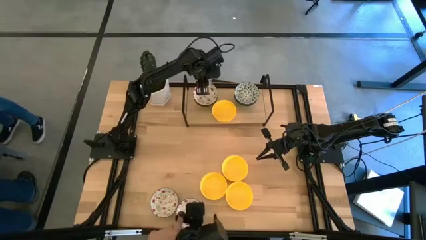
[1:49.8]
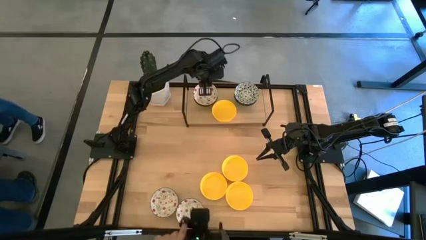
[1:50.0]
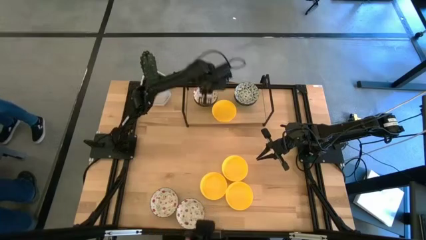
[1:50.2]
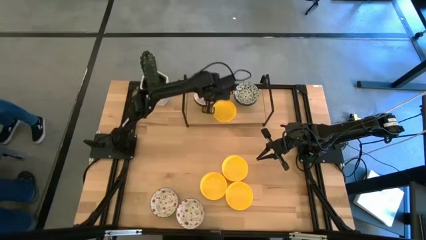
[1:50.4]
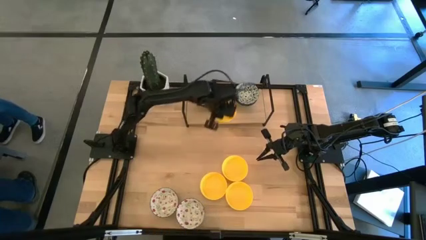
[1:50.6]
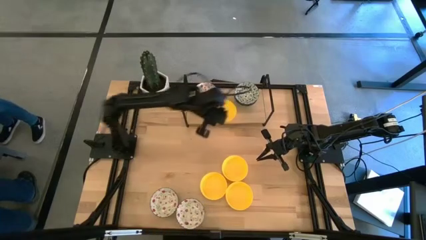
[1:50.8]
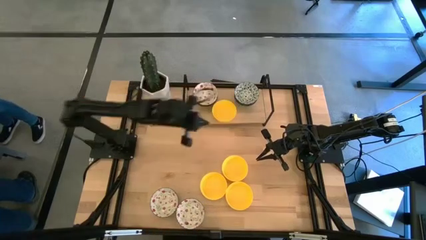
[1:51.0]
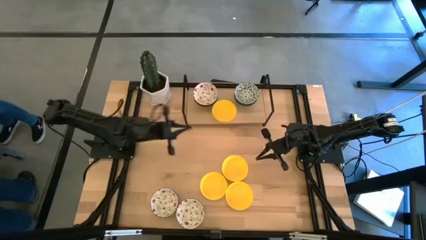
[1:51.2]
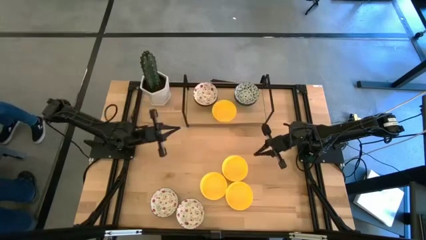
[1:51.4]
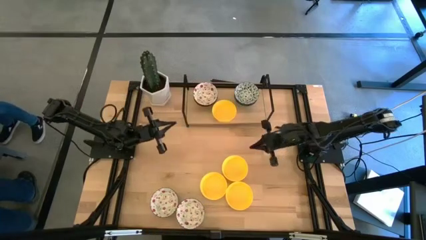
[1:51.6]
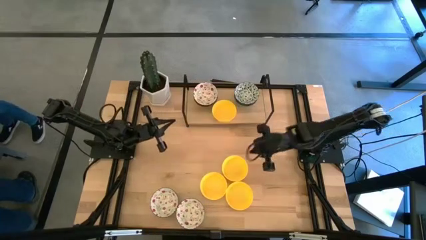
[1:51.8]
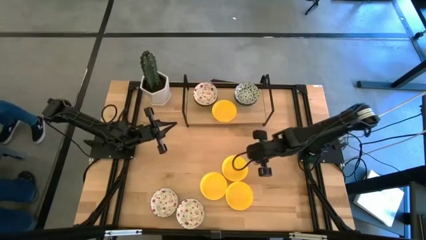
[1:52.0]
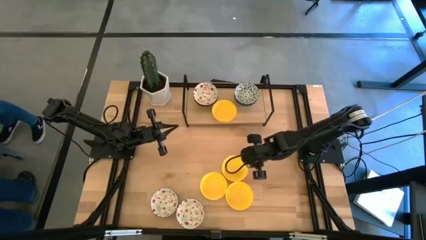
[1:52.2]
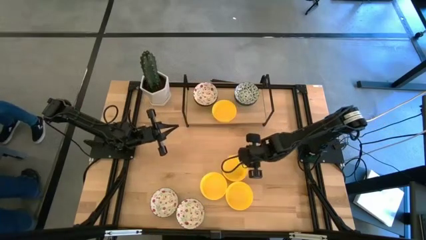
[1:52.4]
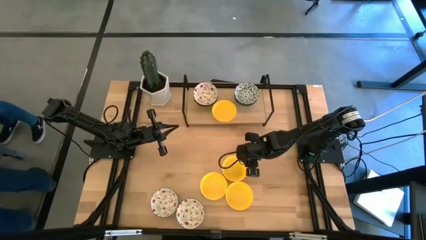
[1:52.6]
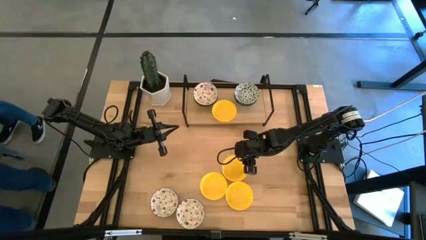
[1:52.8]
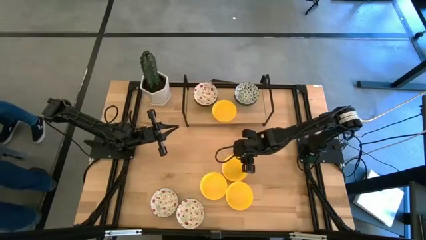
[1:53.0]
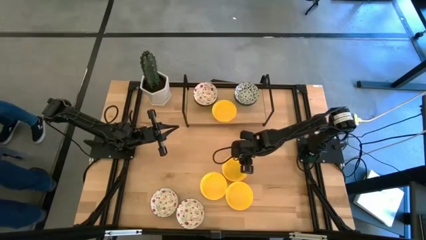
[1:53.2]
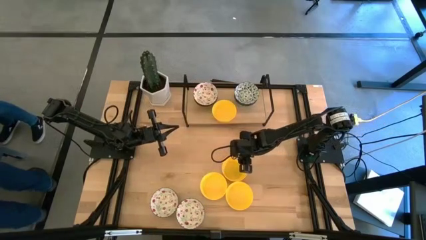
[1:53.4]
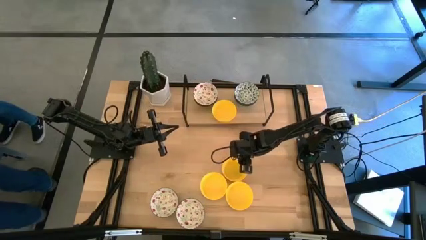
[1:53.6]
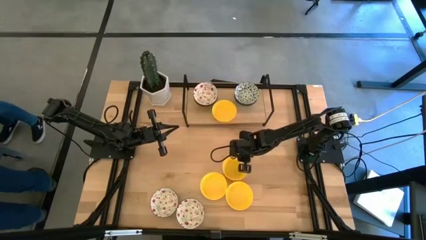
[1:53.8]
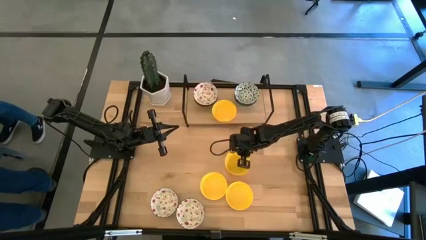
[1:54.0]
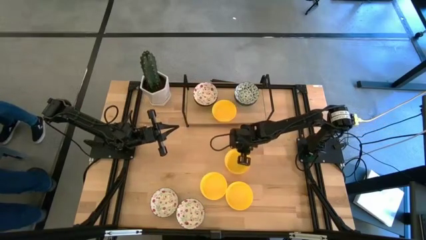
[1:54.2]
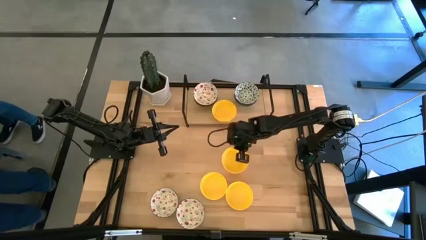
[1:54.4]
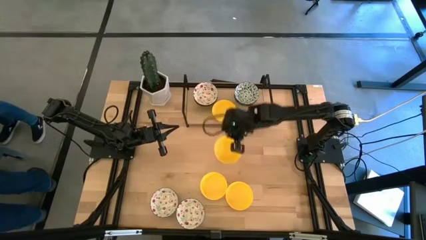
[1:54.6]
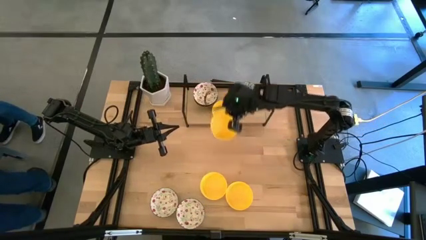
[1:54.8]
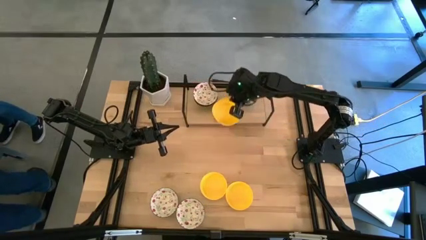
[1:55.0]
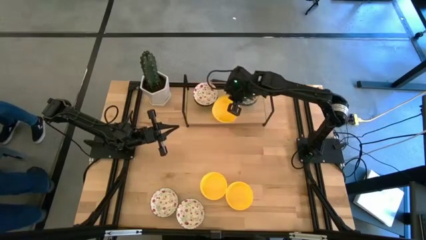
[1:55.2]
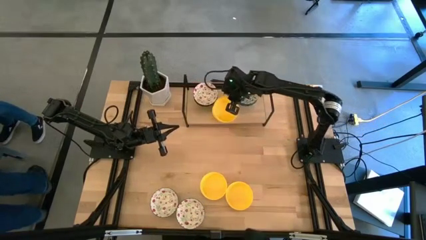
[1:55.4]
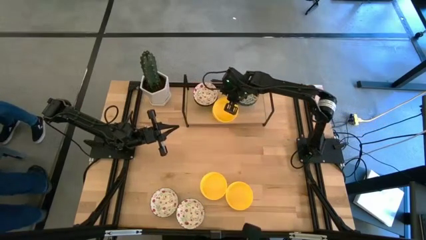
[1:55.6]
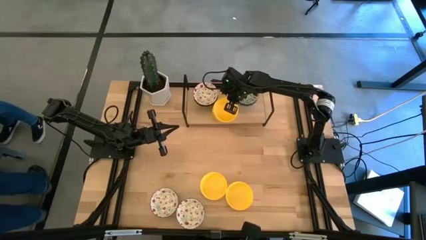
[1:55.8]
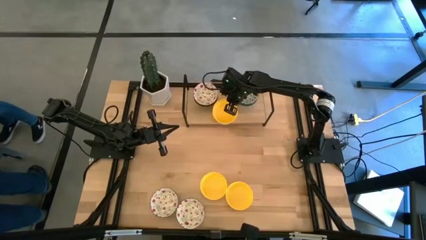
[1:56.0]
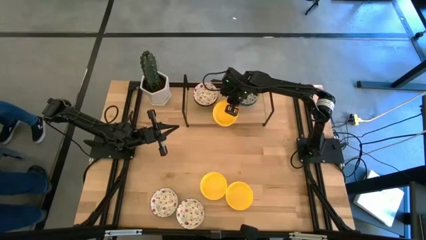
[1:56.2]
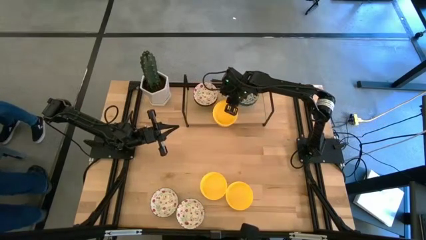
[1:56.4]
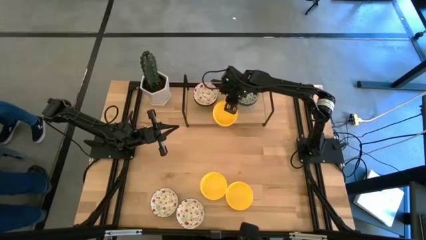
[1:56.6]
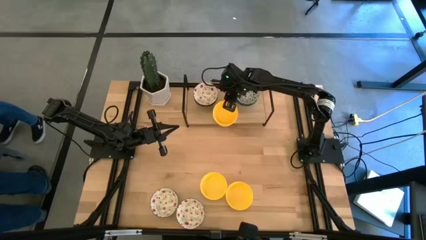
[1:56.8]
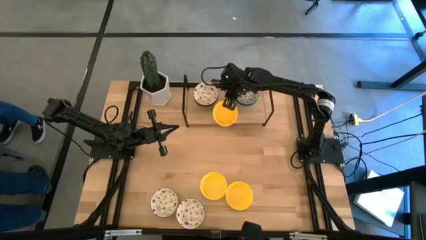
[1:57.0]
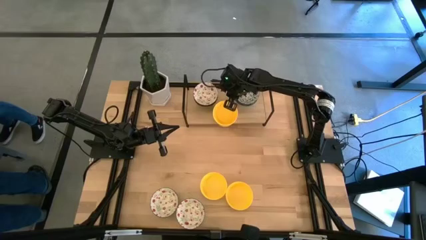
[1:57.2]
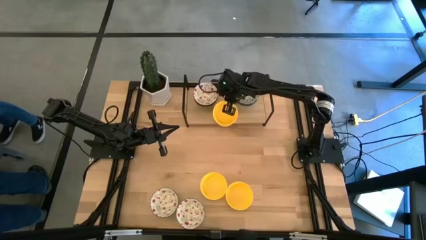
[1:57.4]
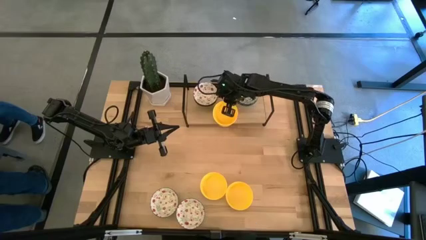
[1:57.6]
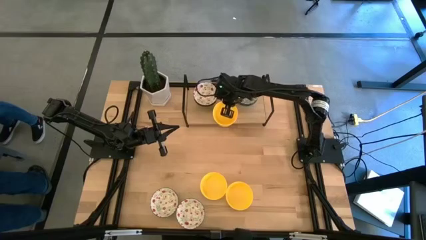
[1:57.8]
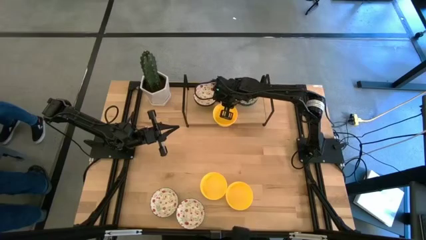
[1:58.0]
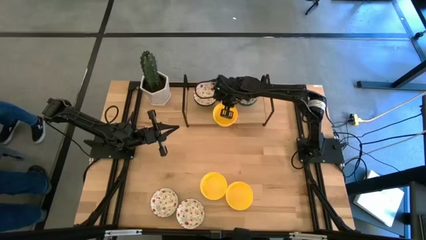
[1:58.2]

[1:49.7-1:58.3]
Task: Pick & Place Mini bowls
Stack the top right yellow bowl on top of the yellow bowls on the shelf

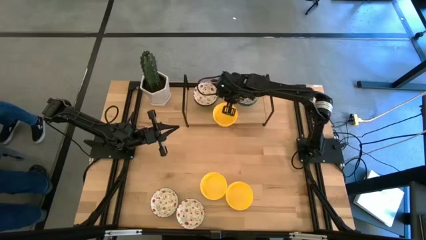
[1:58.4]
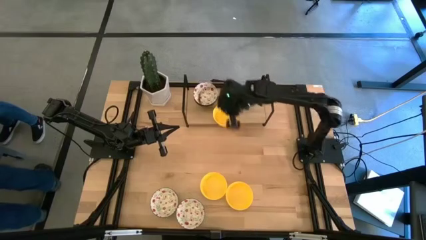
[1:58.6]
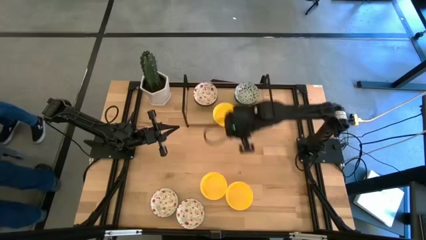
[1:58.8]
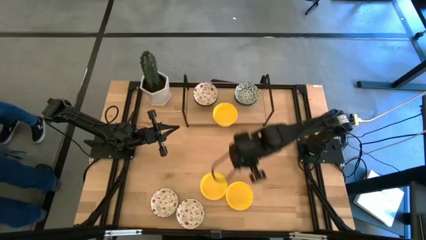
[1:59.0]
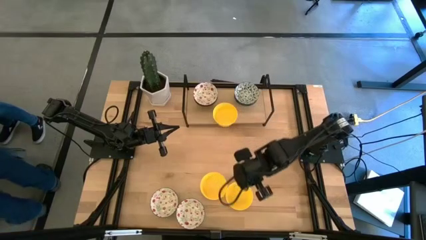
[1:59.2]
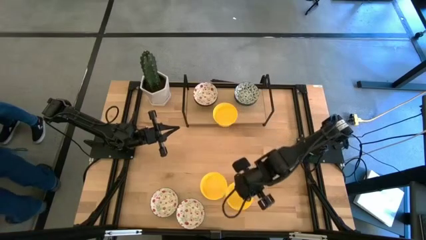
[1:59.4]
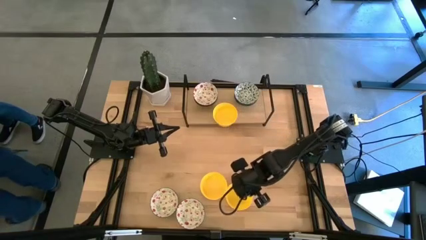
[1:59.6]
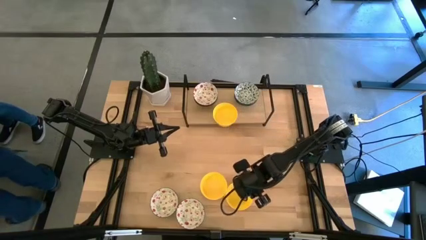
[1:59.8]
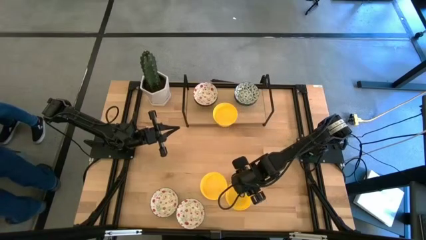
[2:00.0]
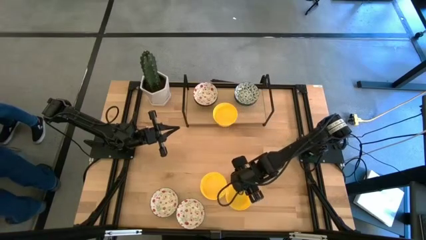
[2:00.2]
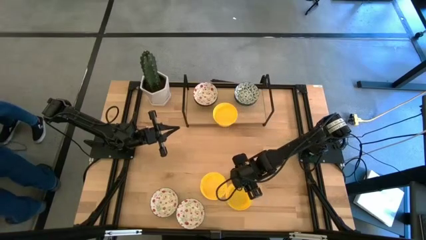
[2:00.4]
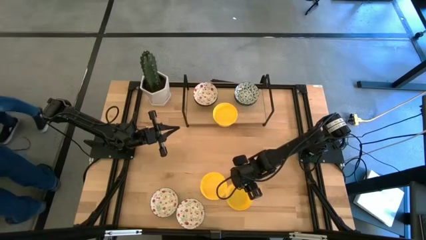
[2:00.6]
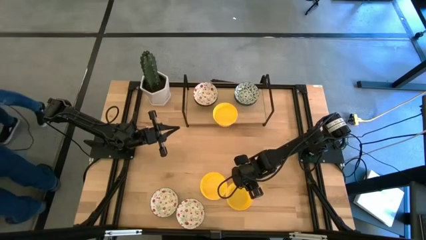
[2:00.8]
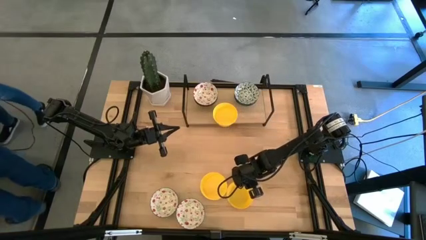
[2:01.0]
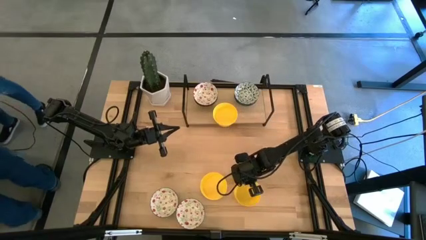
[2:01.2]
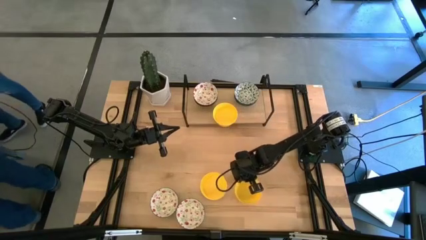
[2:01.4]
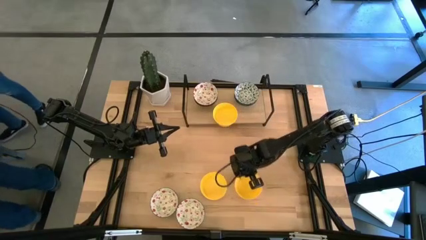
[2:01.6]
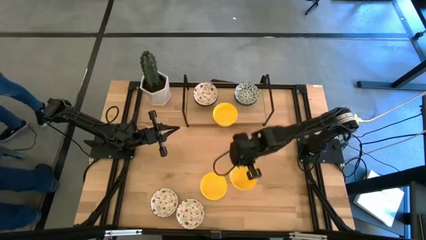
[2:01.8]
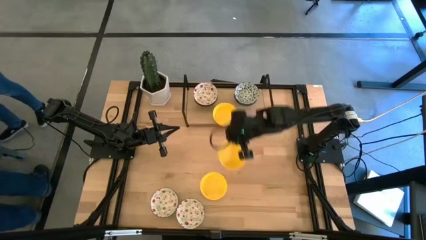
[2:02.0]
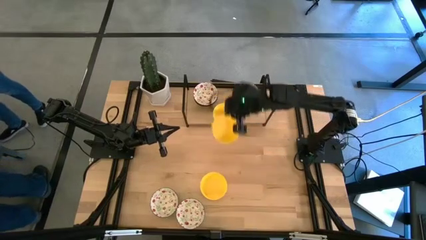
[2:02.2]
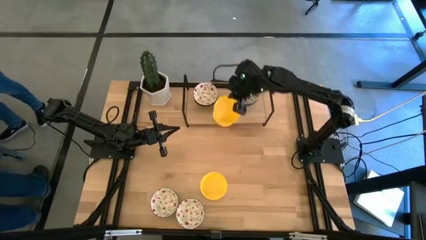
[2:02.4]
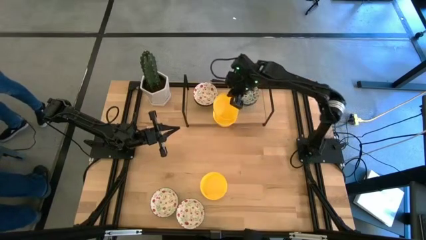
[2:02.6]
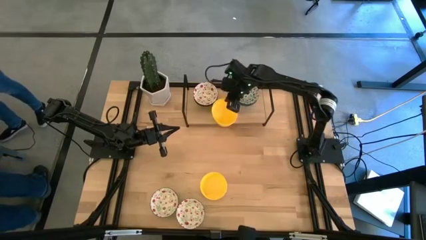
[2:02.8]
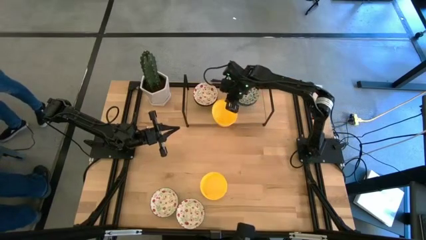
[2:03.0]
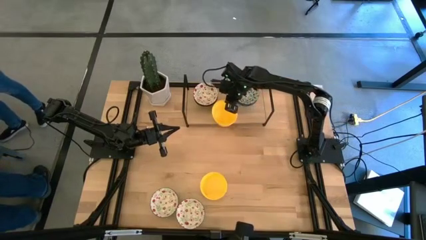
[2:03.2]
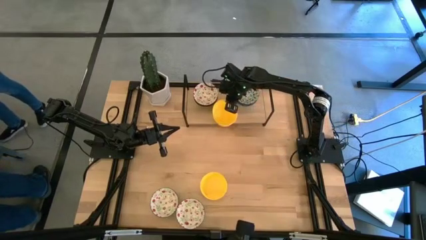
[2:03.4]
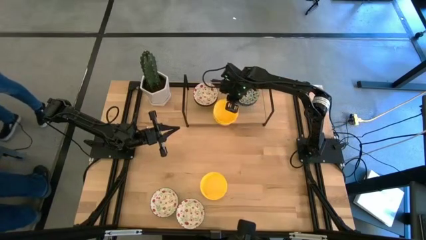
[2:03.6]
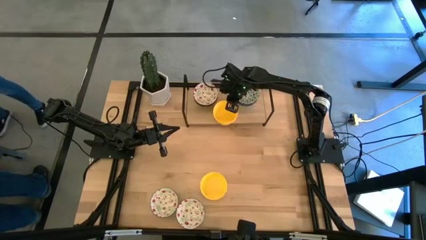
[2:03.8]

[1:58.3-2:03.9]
Stack the right yellow bowl on top of the yellow bowls on the shelf

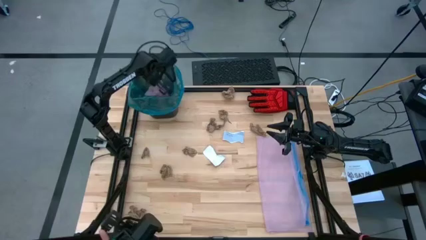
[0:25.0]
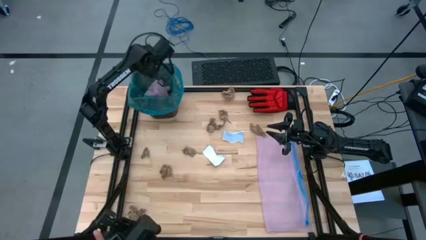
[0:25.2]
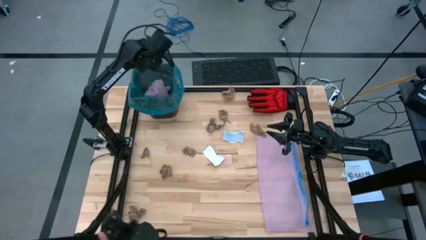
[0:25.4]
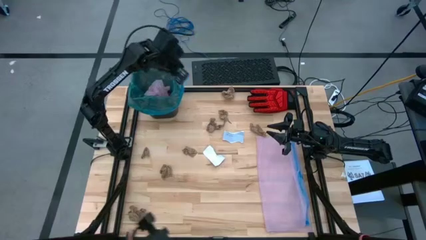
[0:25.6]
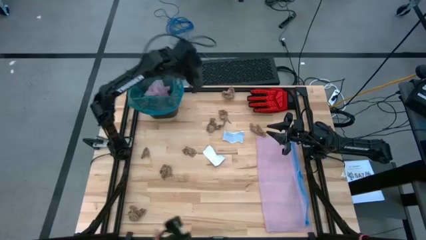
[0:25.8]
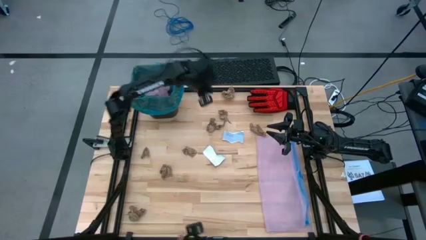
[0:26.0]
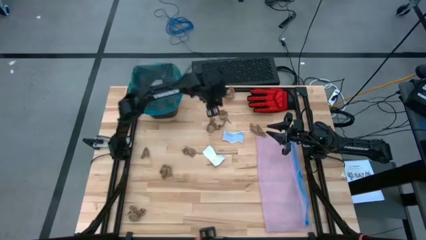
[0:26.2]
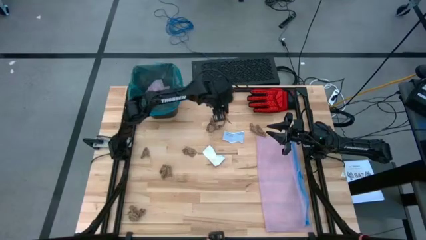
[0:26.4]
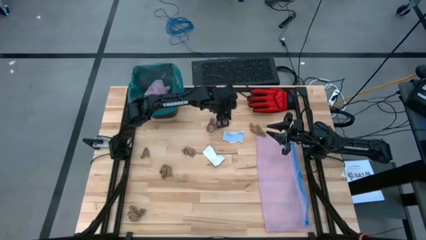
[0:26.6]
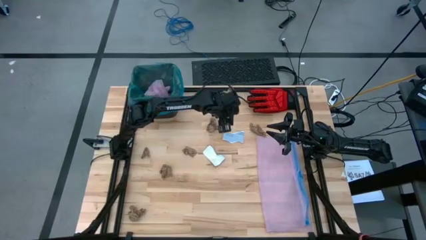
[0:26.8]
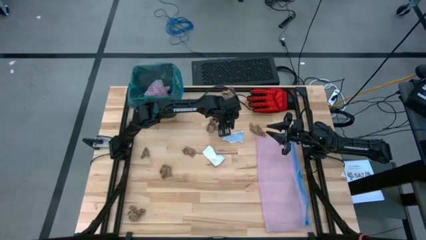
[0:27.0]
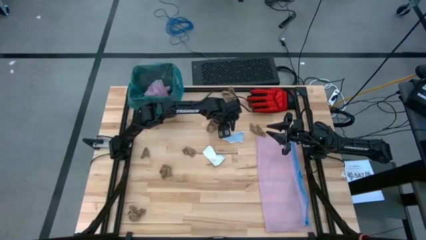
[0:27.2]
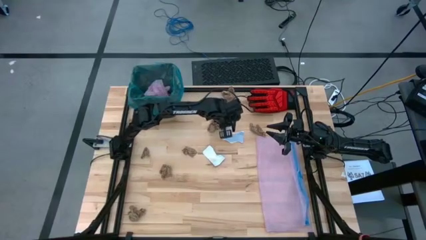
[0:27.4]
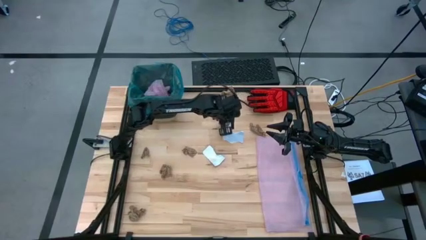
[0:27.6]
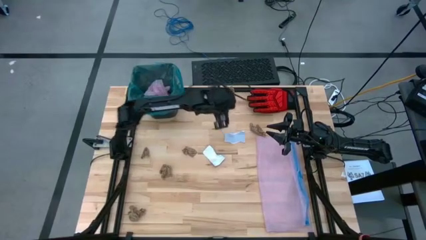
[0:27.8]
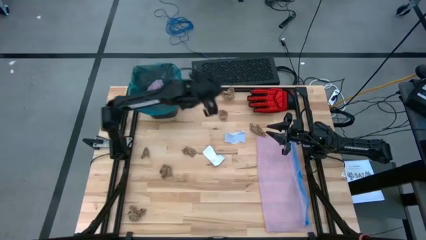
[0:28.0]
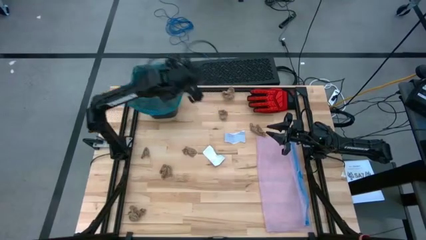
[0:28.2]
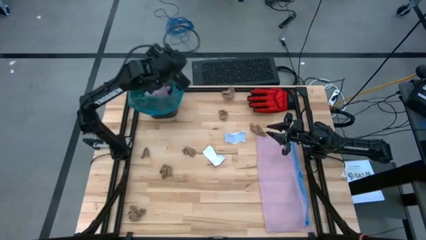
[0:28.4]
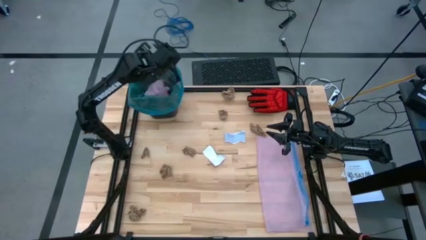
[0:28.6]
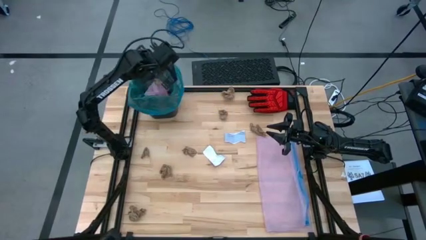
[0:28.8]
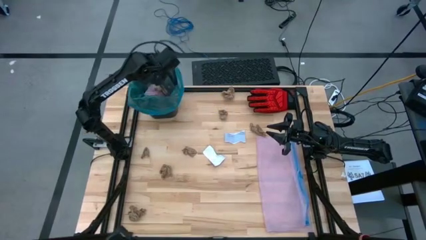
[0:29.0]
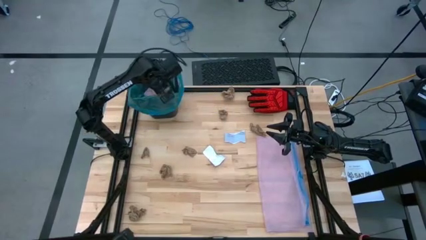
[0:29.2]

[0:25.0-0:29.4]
Task: place trash/remove bag and relplace
Put the brown napkin into the trash bin
